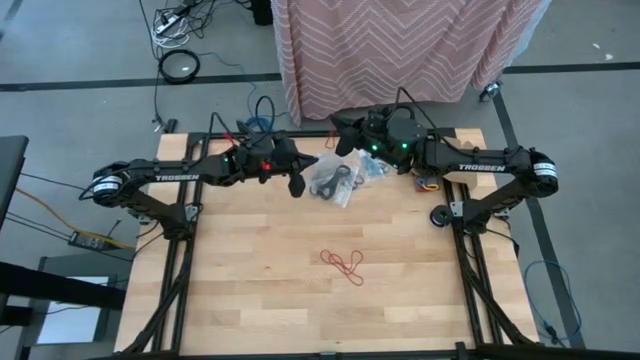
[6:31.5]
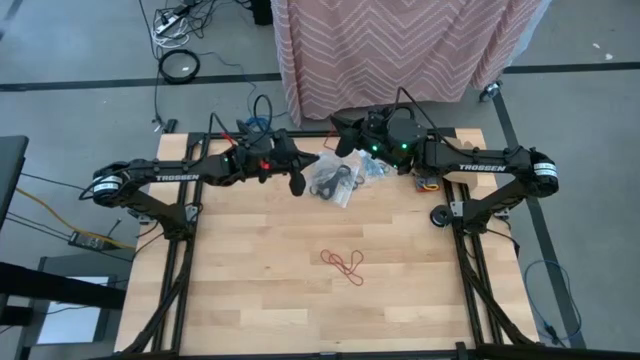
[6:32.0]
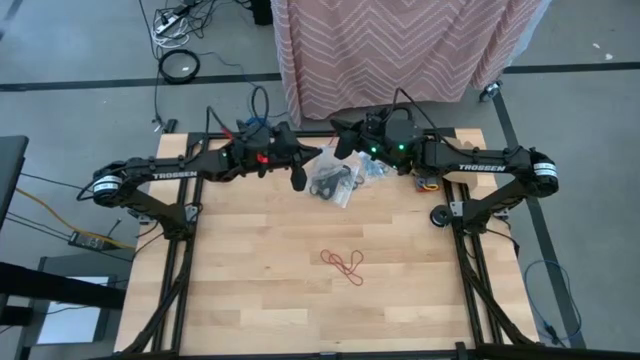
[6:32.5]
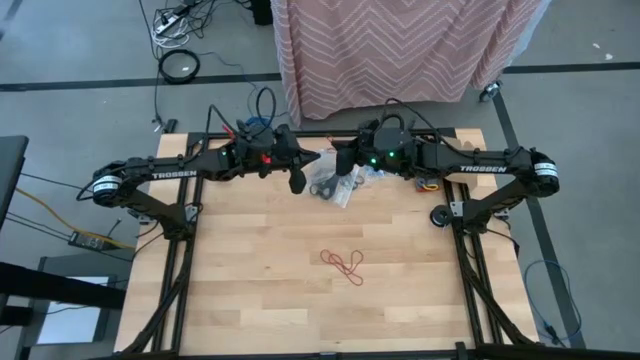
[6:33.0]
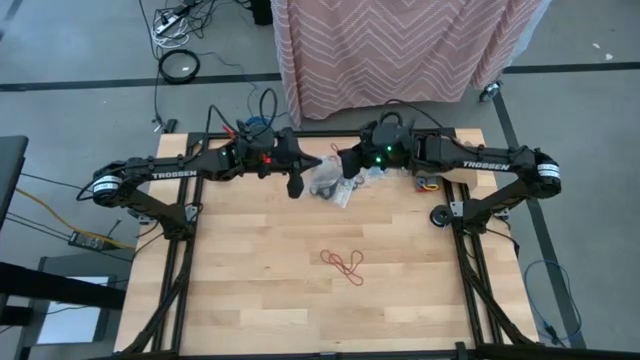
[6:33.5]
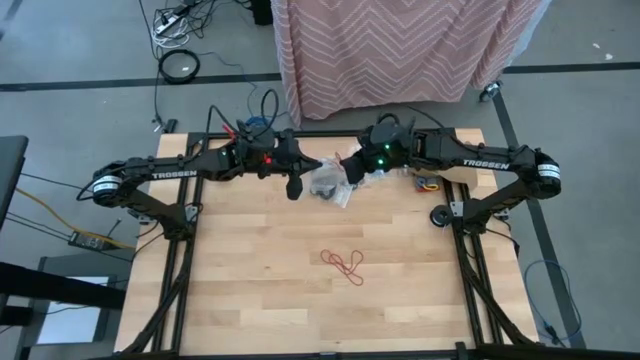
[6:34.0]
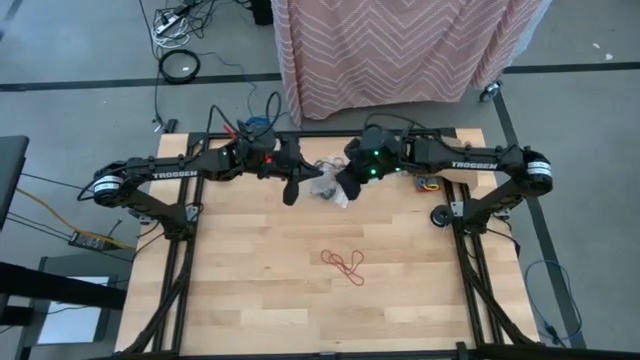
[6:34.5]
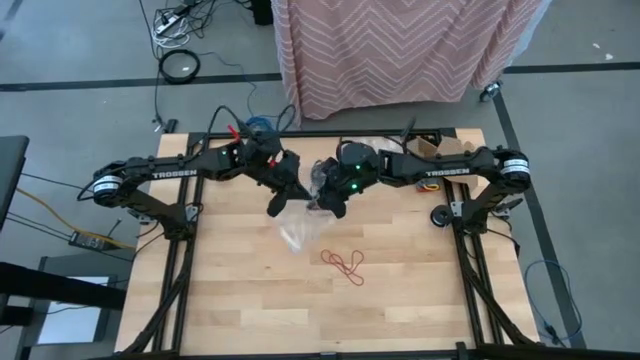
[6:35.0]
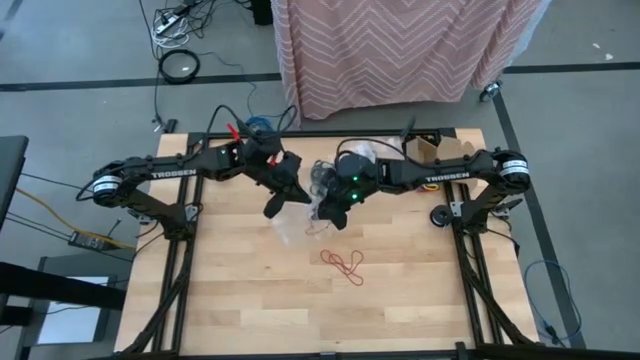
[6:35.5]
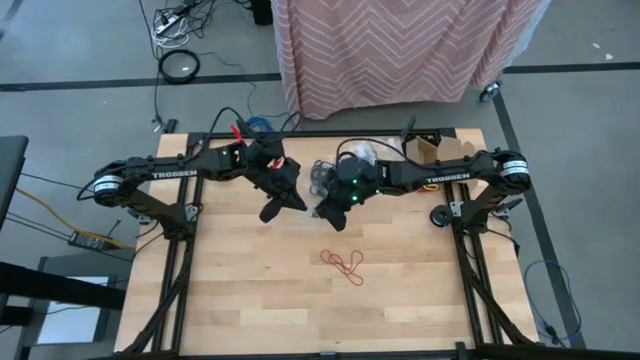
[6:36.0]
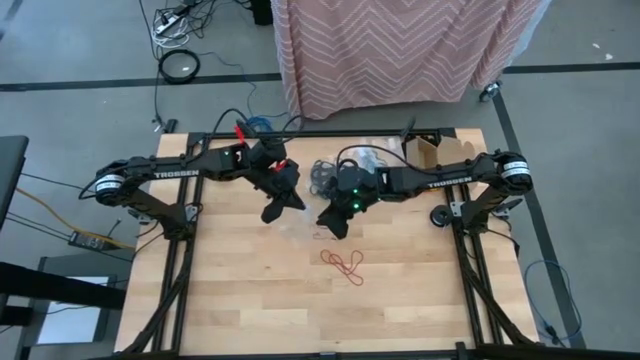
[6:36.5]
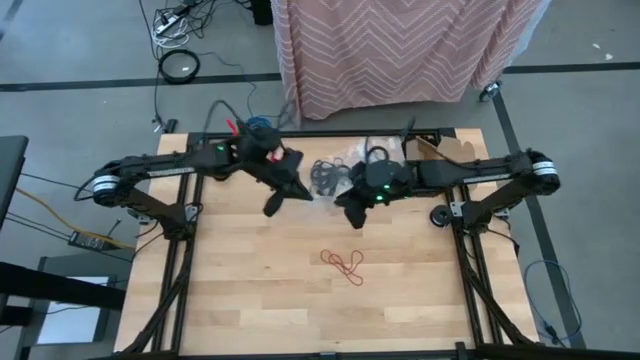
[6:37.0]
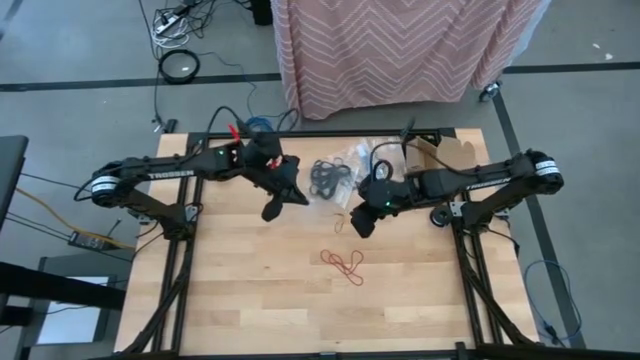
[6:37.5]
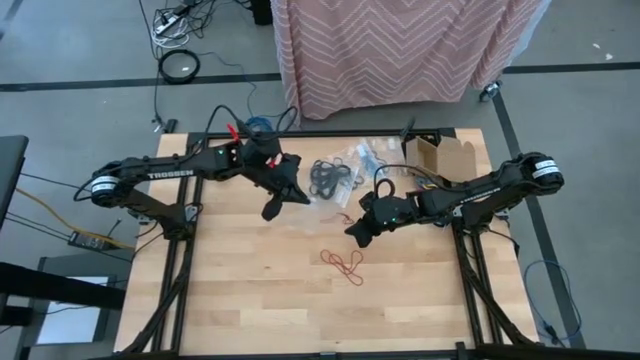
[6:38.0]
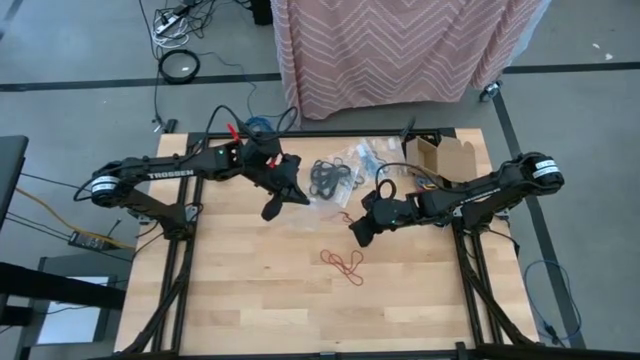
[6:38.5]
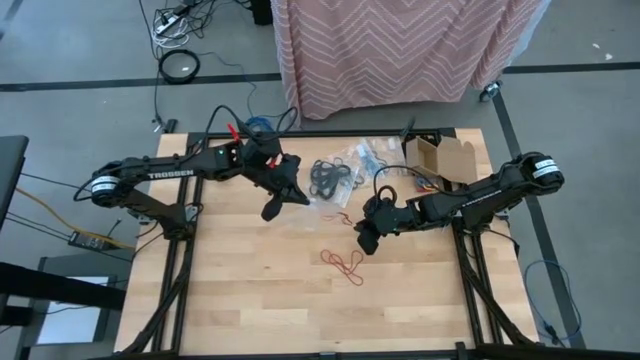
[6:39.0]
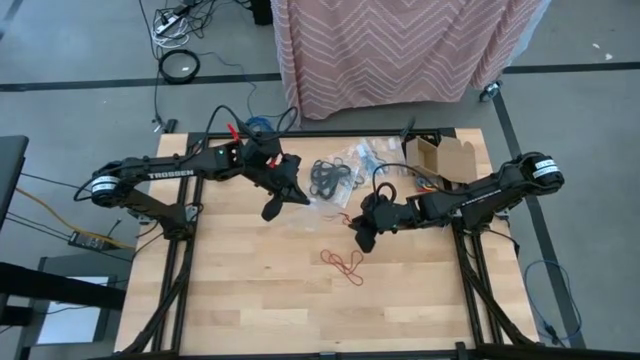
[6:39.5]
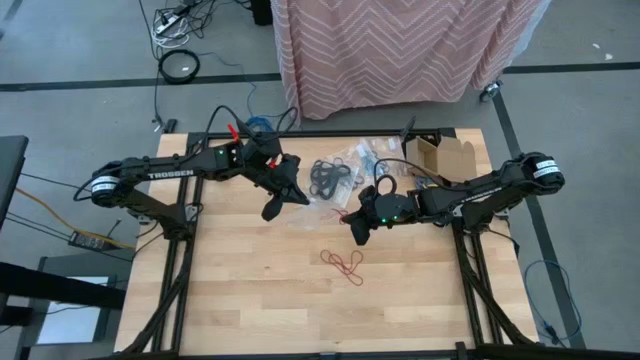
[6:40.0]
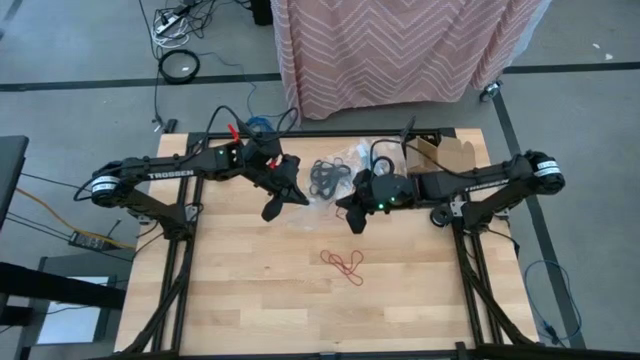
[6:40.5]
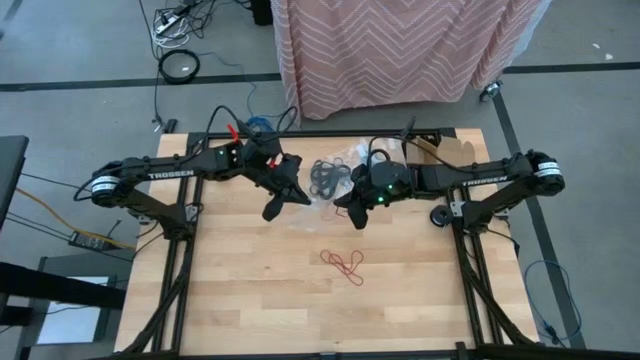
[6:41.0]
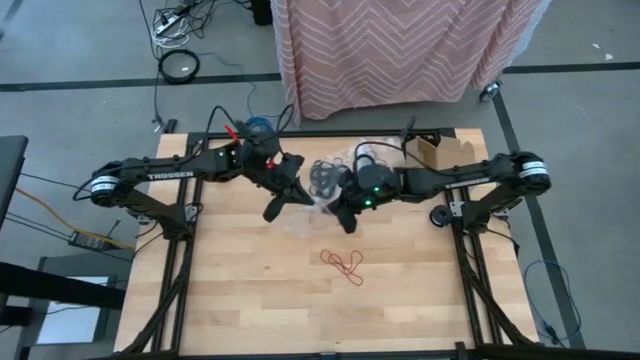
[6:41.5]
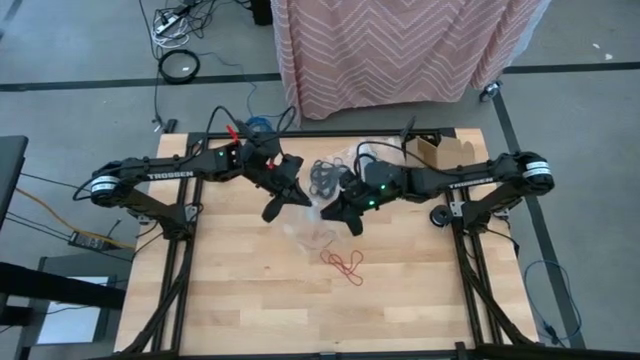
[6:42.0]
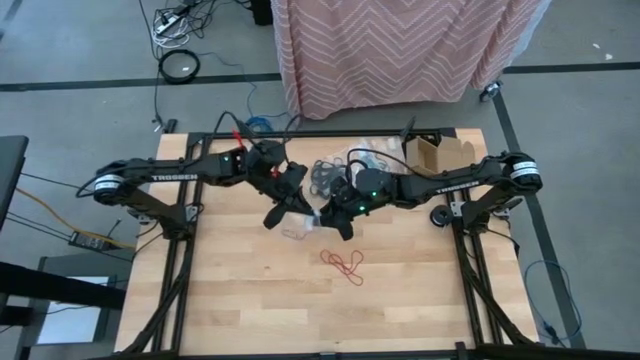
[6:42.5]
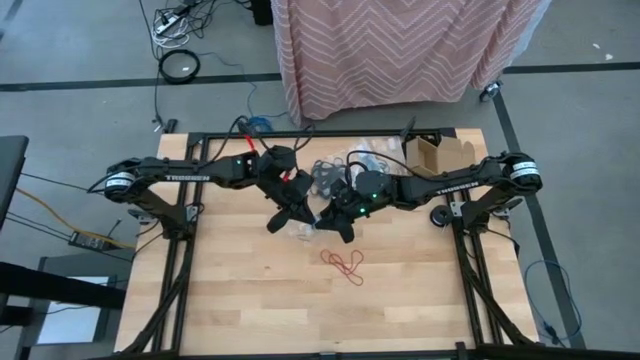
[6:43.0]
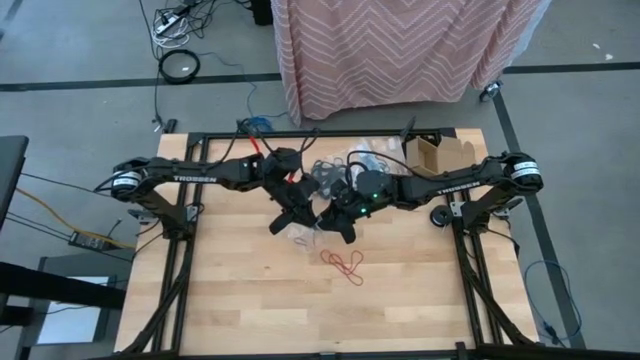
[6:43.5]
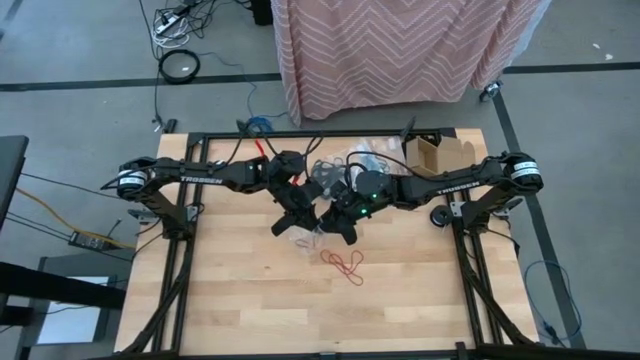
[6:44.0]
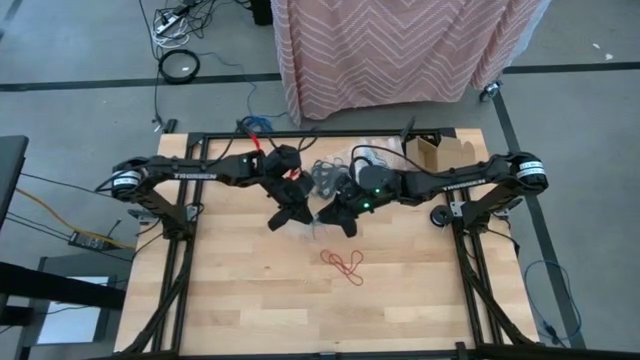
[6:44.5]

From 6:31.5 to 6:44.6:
Task: Sort rubber bands
Put the red rubber band into the transparent zip bag

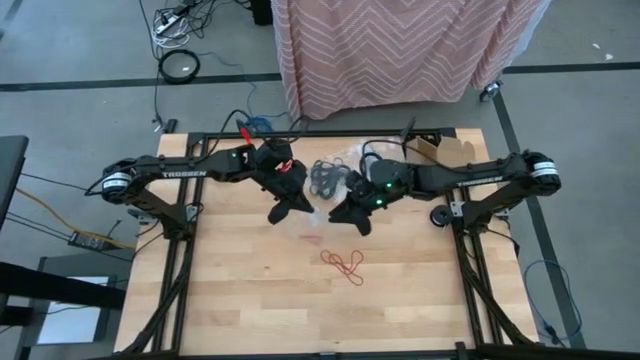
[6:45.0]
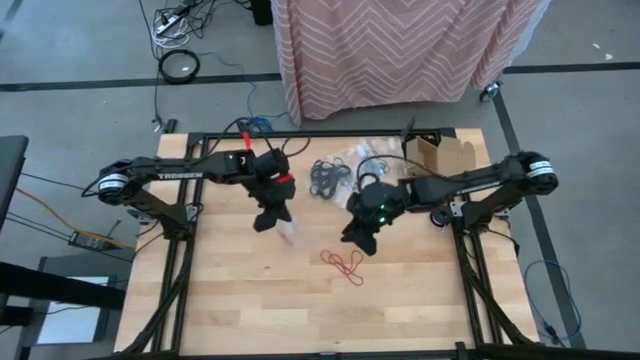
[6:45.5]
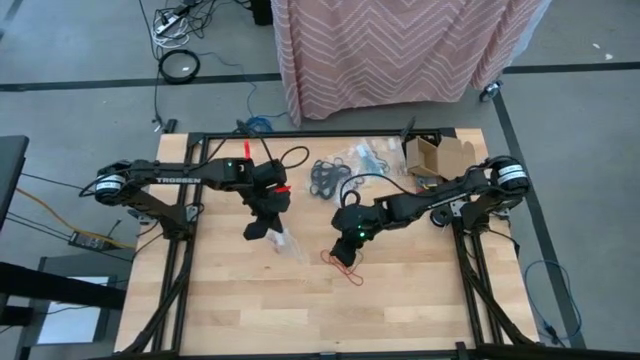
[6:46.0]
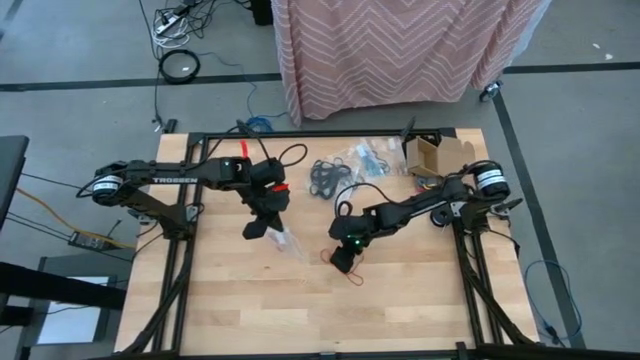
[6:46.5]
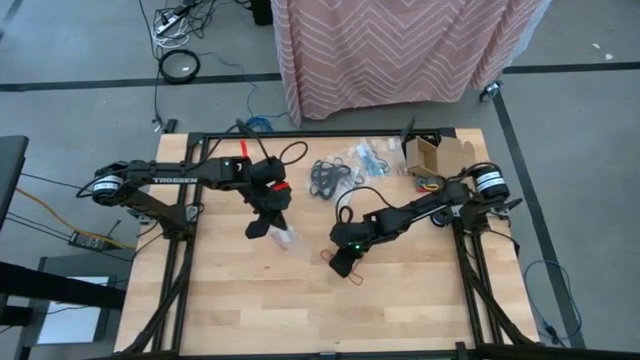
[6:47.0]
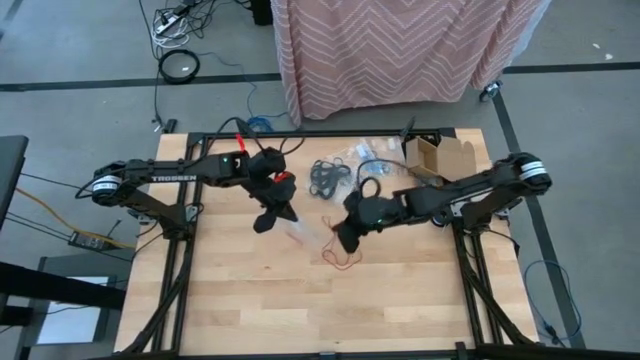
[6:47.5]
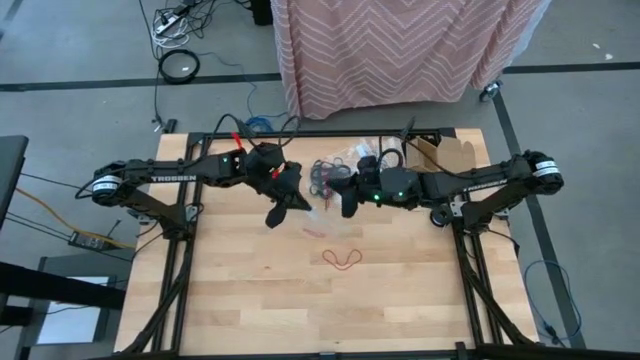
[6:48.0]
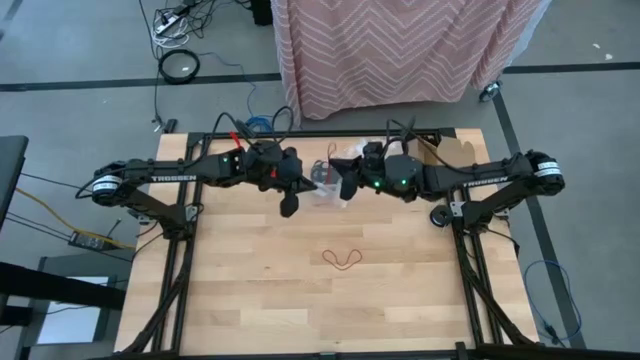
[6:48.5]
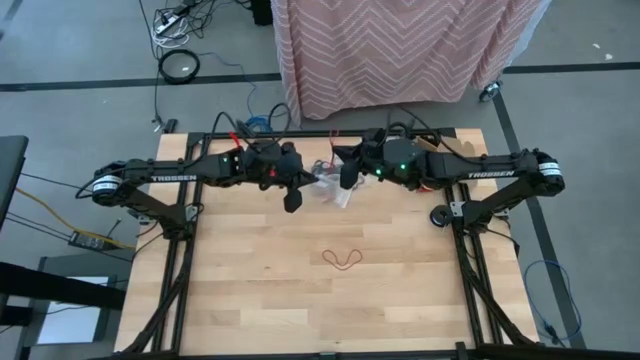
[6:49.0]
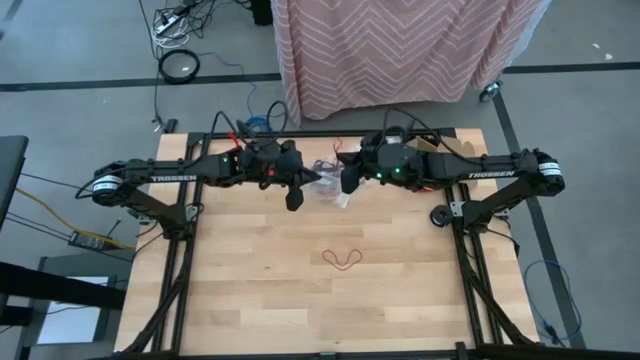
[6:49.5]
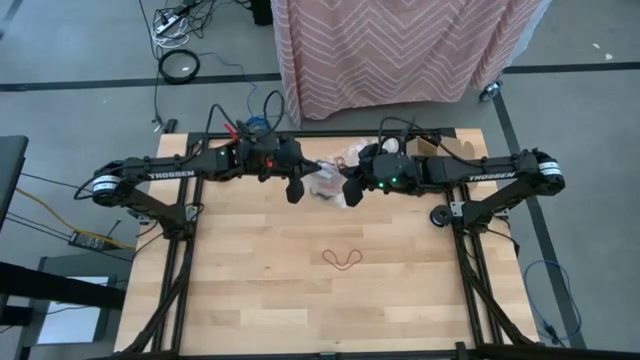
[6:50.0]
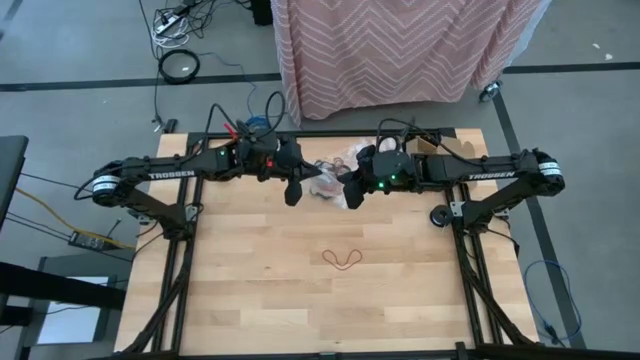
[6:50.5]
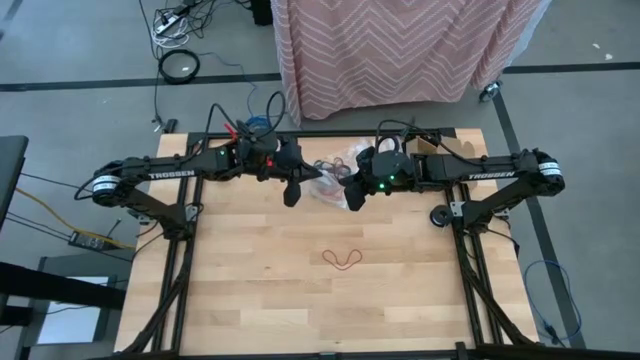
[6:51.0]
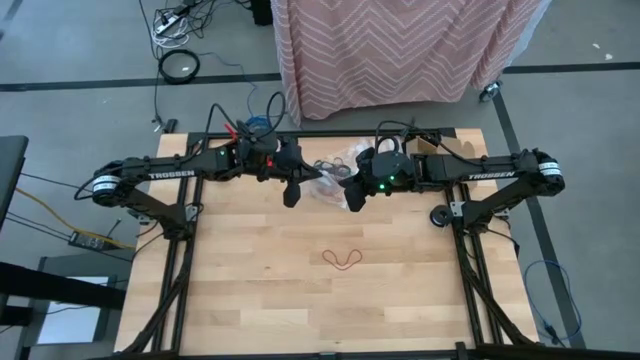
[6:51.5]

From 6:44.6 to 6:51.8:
Put the red rubber band into the transparent zip bag

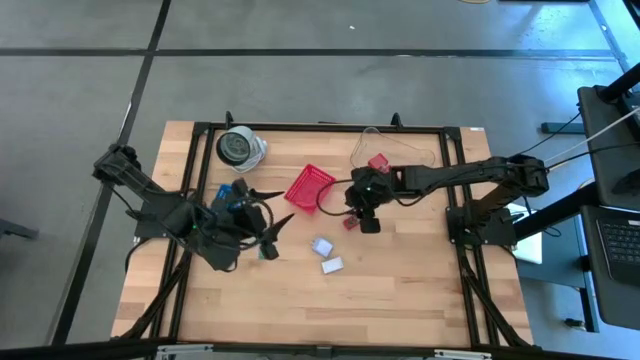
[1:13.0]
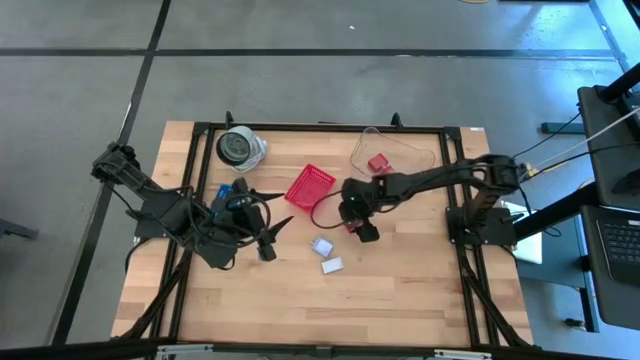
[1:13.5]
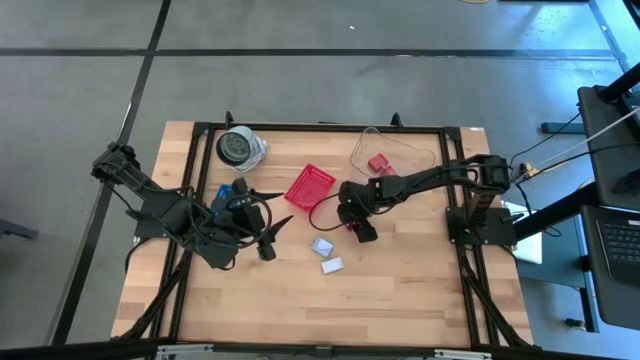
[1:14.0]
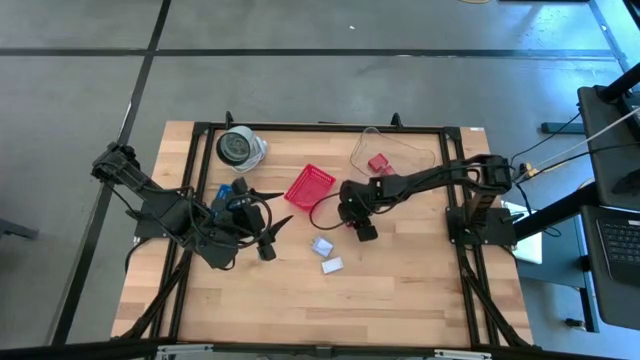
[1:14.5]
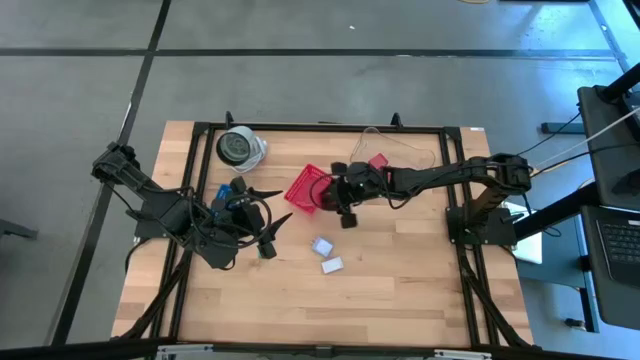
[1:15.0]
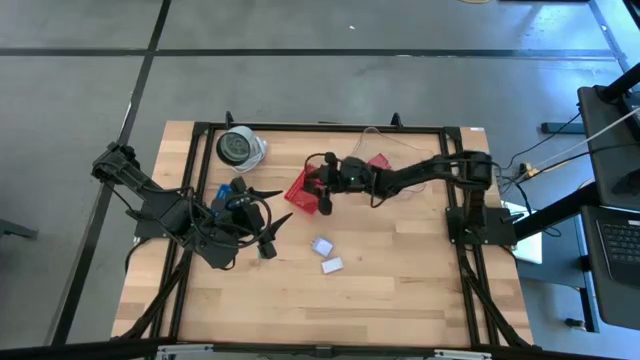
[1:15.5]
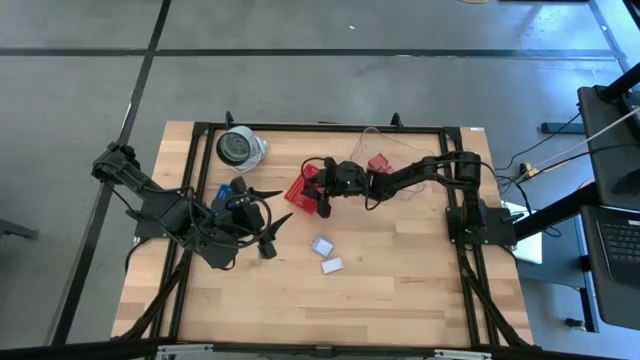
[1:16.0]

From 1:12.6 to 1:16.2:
Task: Pick & Place Office items
Put the red digital clock into the red bin
